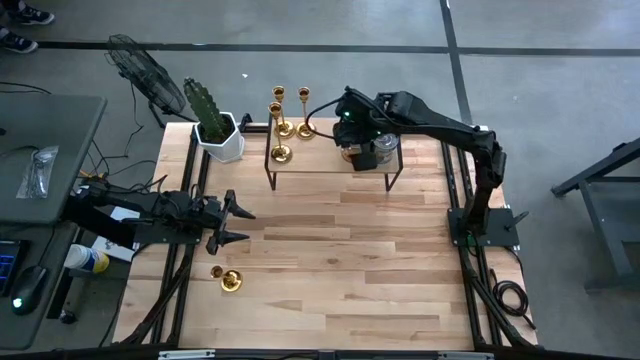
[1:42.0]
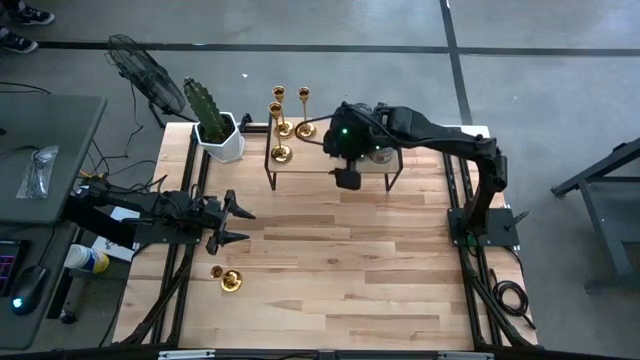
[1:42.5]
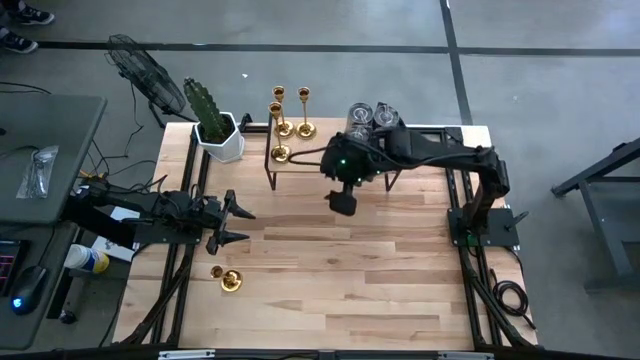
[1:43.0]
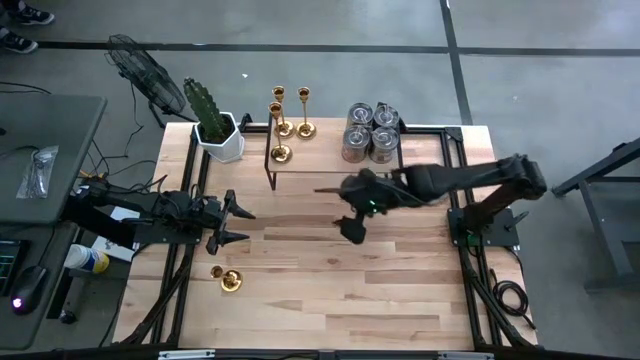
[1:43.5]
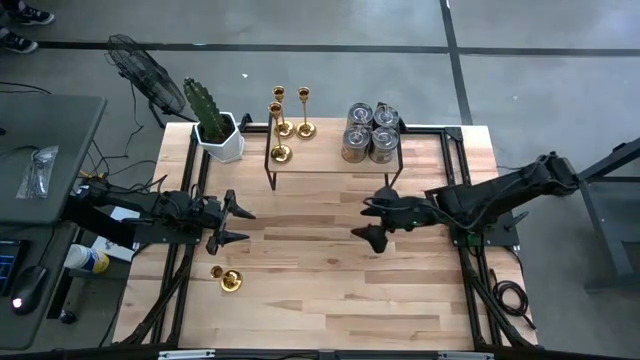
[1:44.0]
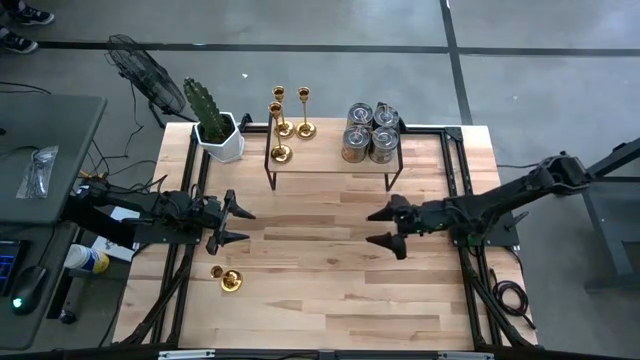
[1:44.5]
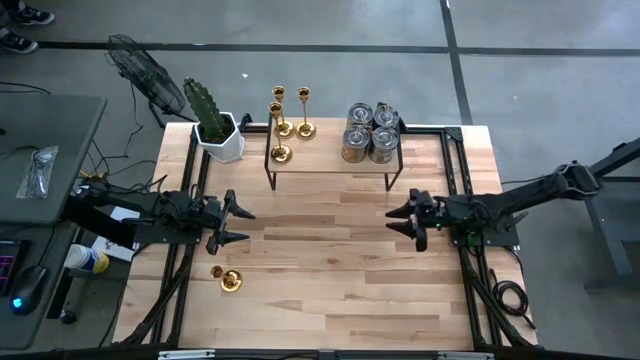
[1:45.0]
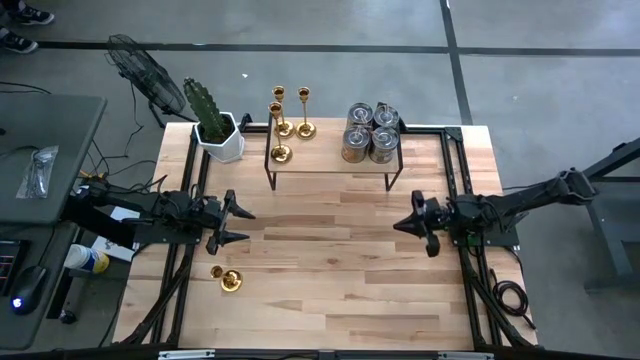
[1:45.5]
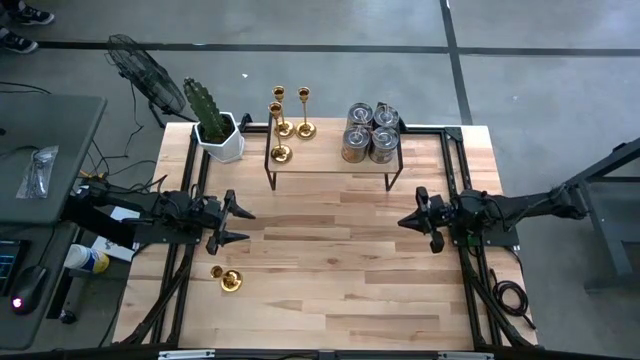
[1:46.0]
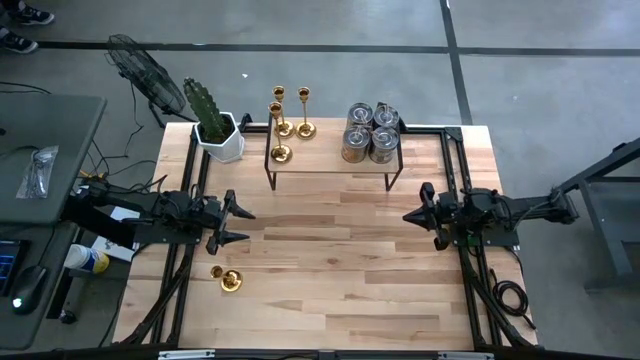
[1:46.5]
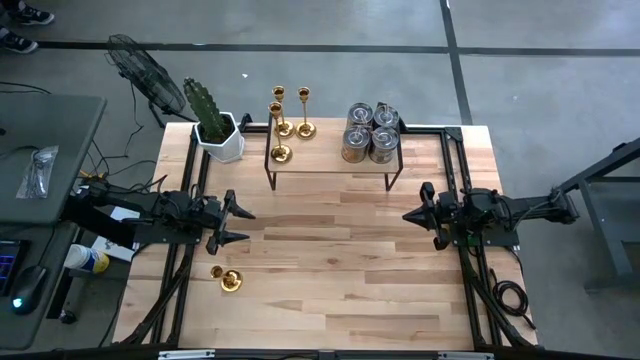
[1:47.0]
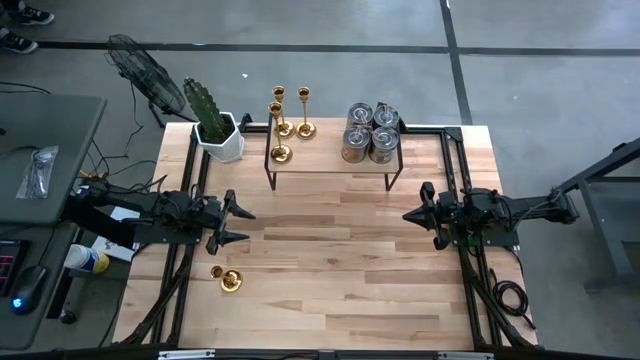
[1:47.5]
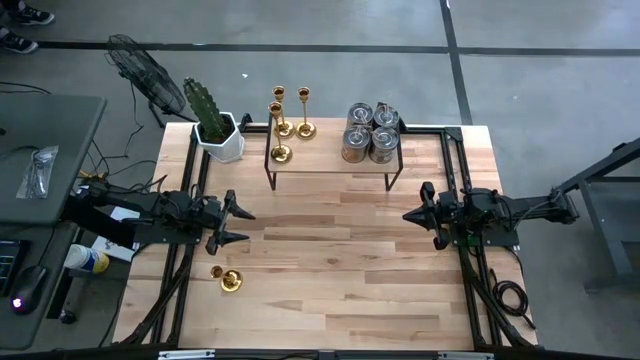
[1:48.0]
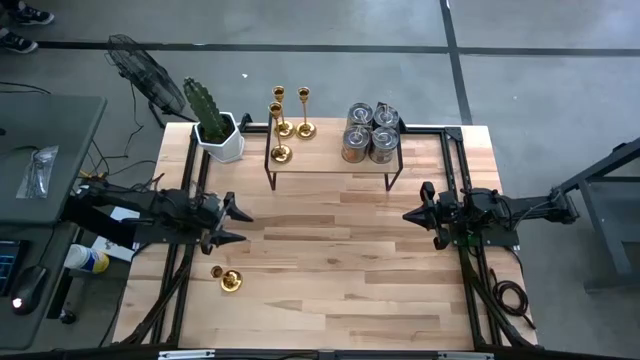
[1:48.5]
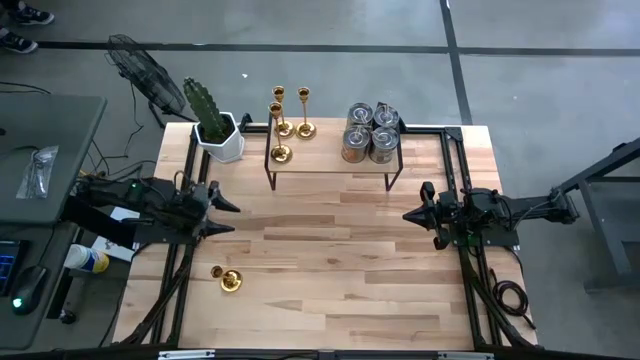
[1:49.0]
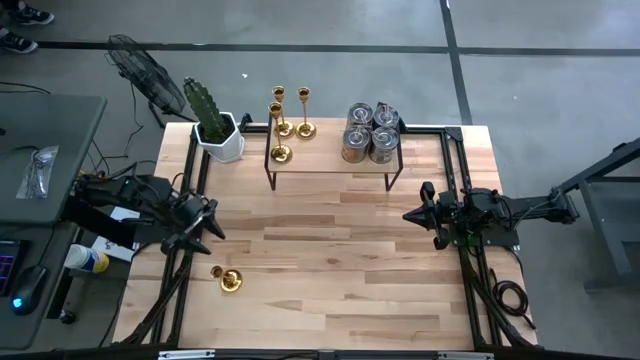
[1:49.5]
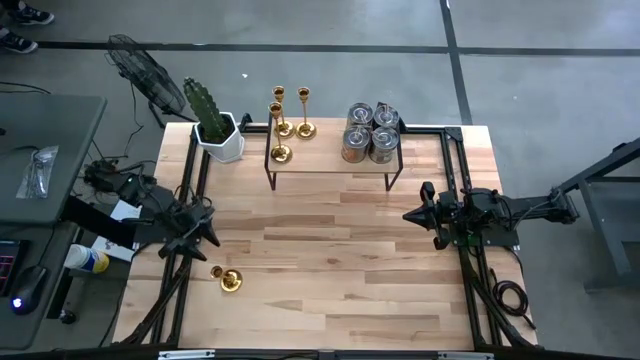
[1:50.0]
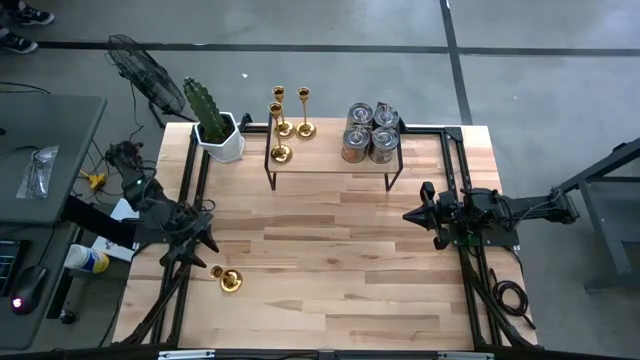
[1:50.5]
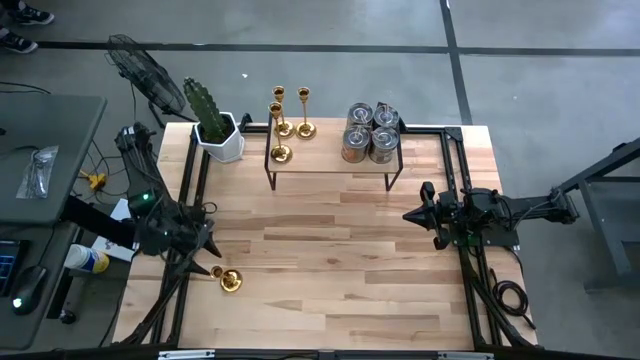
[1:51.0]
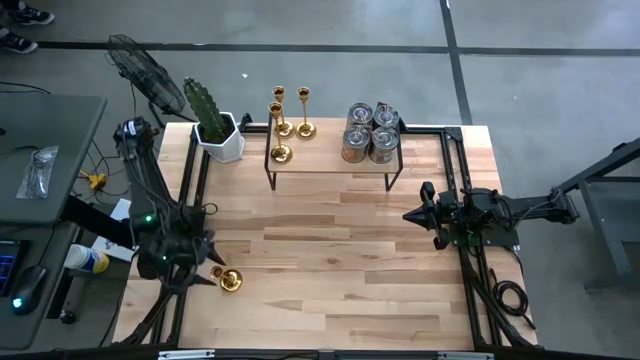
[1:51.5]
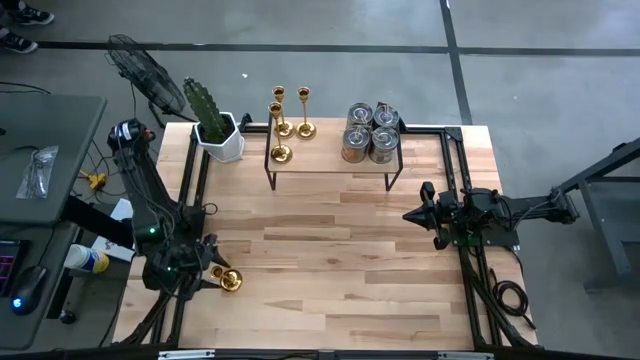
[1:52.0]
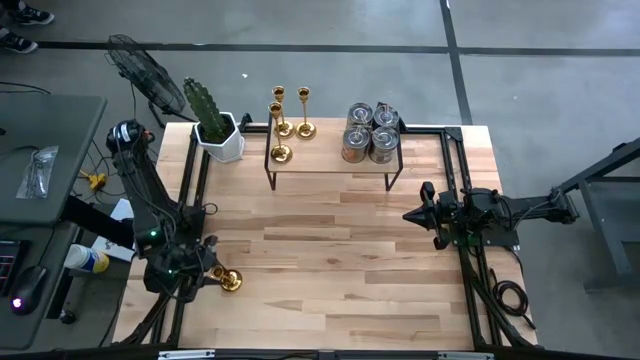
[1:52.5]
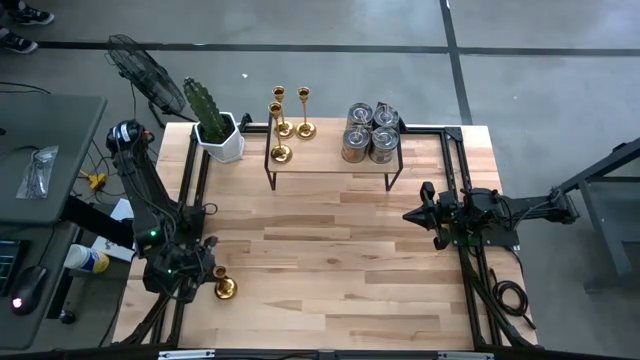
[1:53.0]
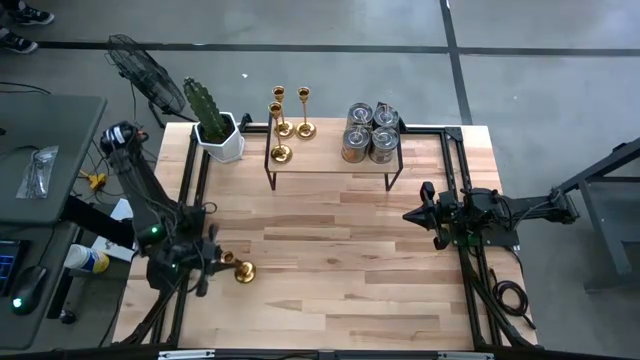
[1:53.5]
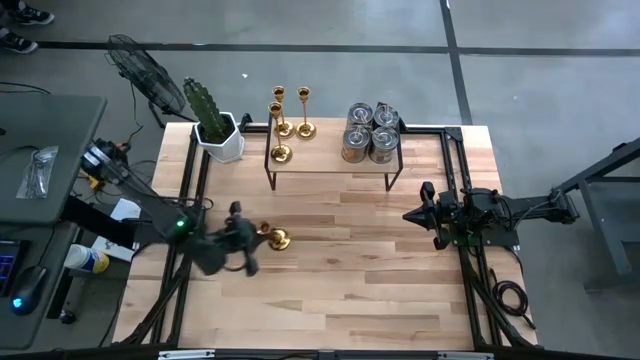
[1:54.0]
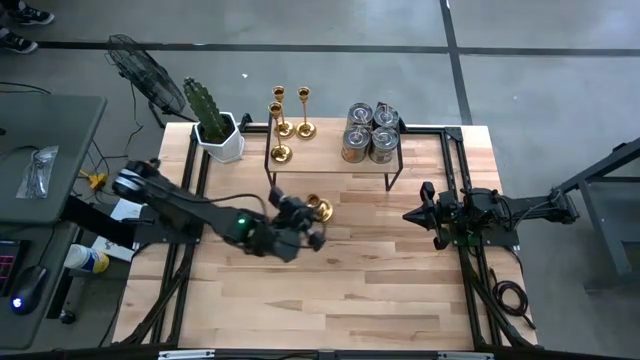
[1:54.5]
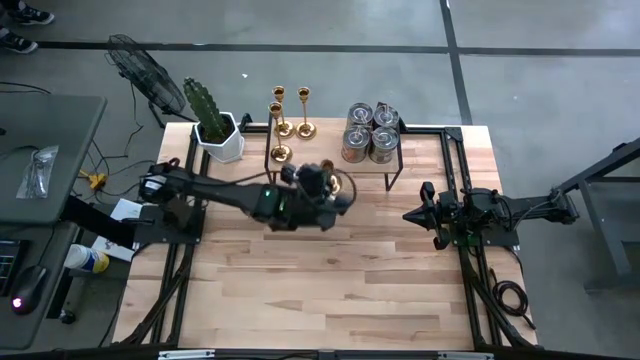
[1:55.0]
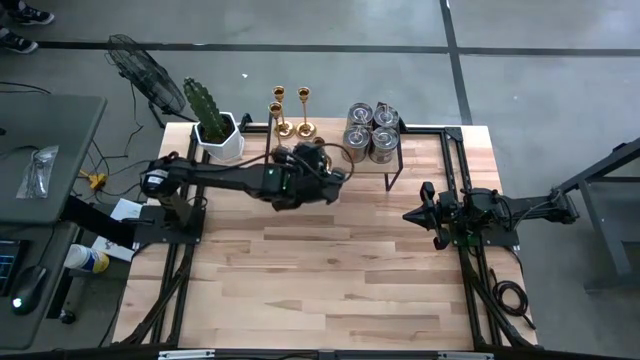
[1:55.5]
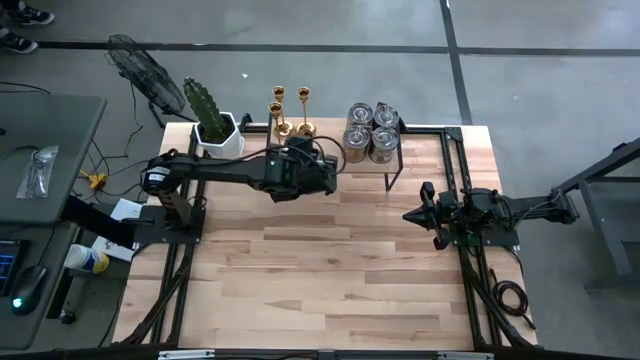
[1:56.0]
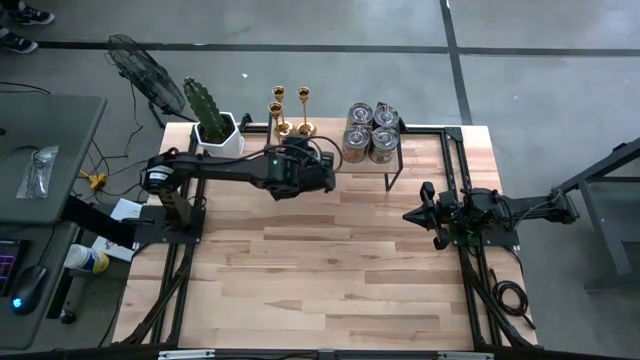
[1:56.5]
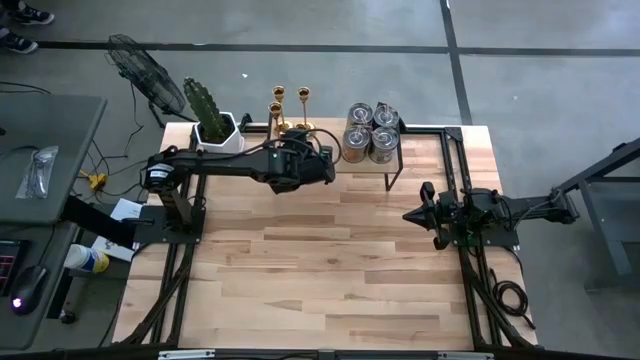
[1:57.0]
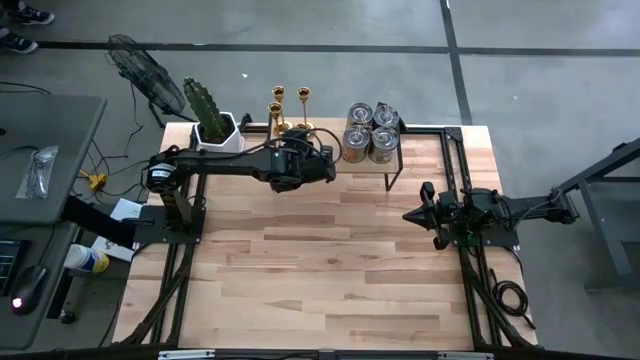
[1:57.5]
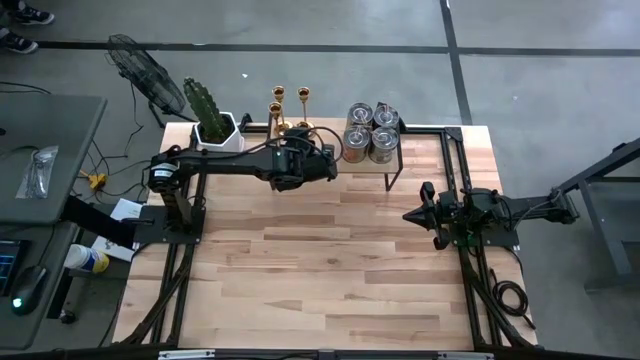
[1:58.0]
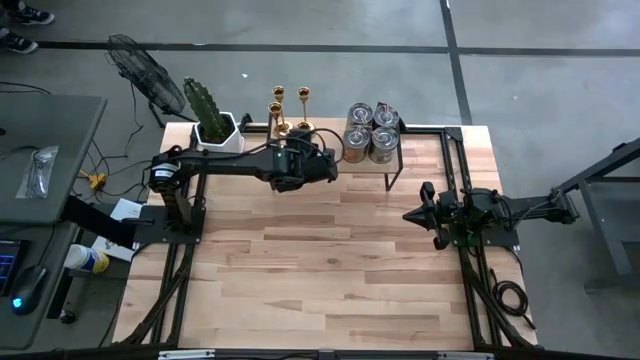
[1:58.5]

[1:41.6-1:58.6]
Task: Pick & Place candle stick holders
Align the gold candle holder with the other gold candle holder on the shelf

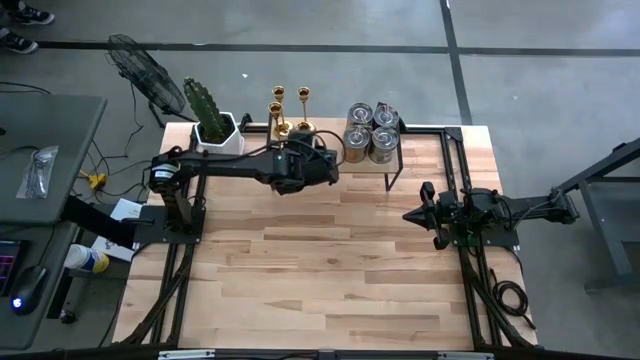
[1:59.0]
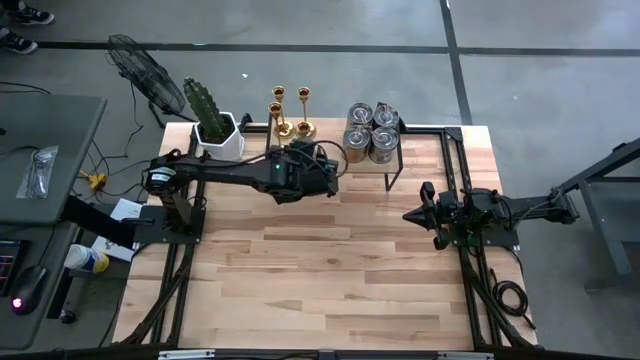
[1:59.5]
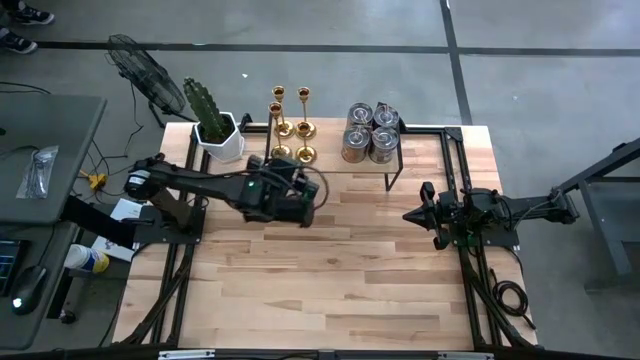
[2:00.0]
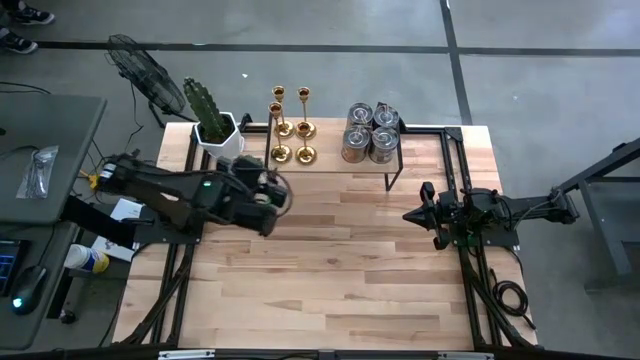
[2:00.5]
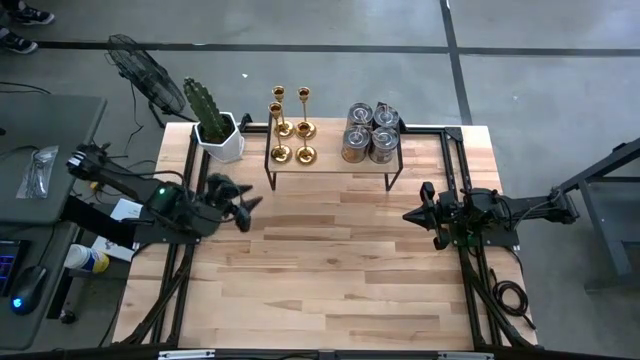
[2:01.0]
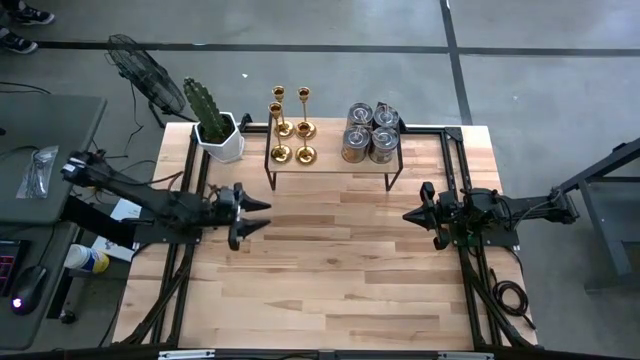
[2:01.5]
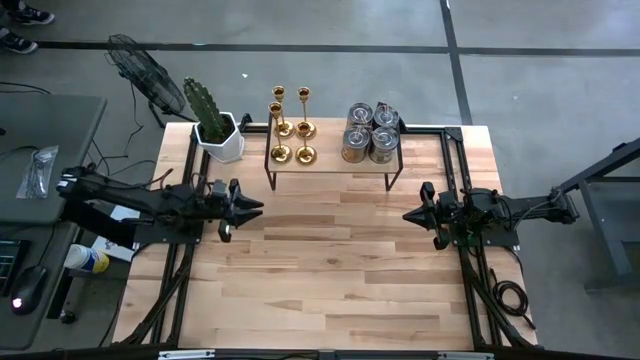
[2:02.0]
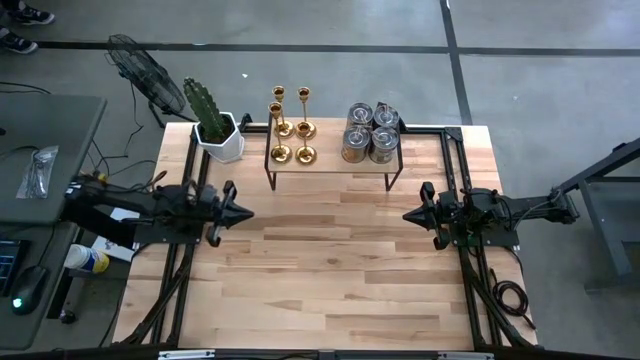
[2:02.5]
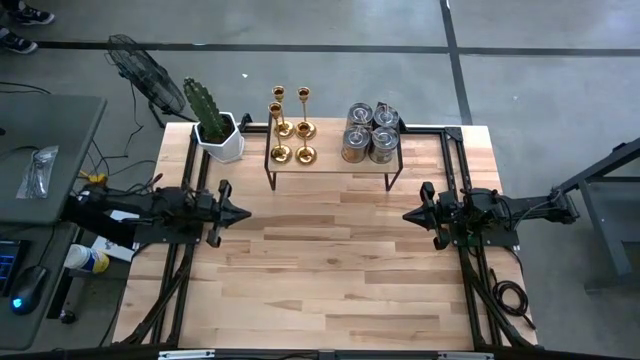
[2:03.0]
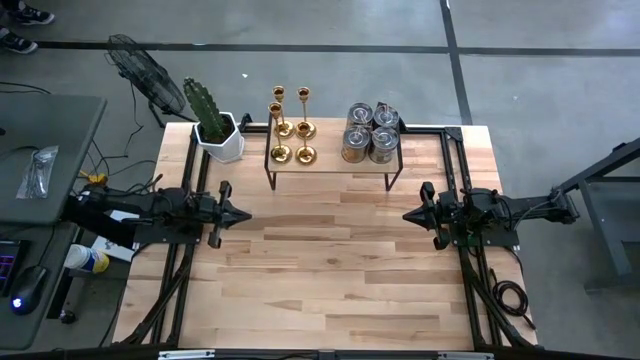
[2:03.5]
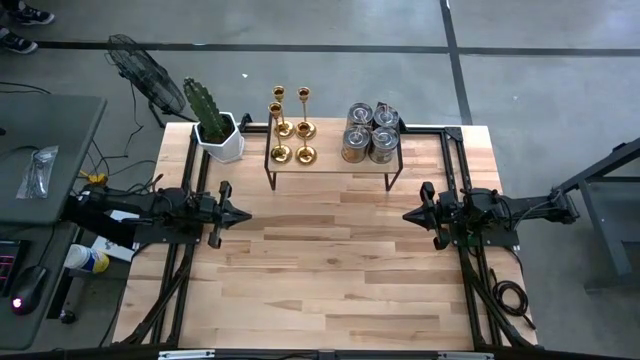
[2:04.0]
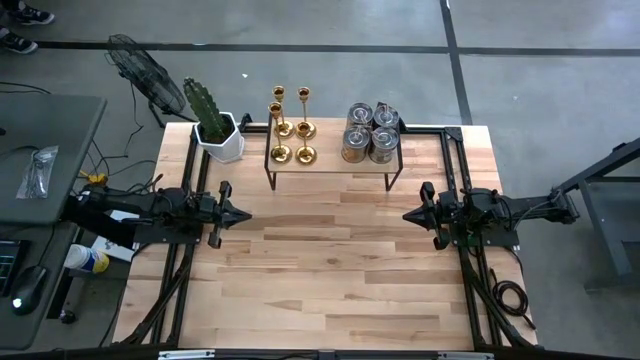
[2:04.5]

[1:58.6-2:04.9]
Return to Home Position
